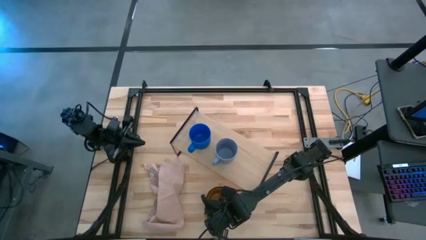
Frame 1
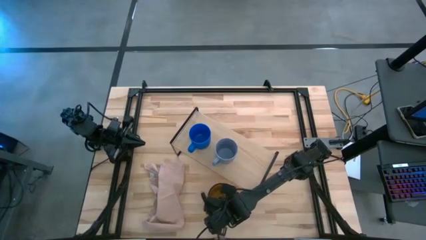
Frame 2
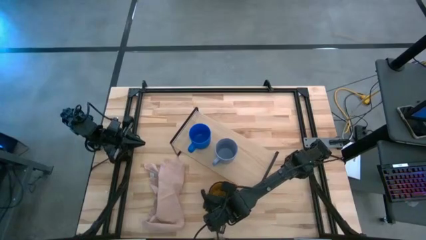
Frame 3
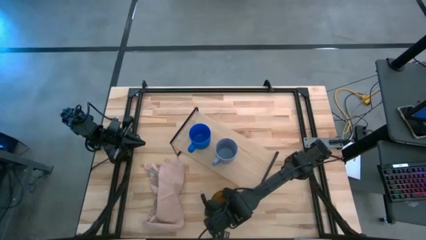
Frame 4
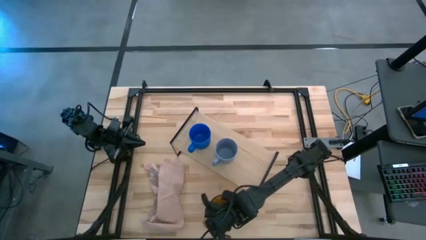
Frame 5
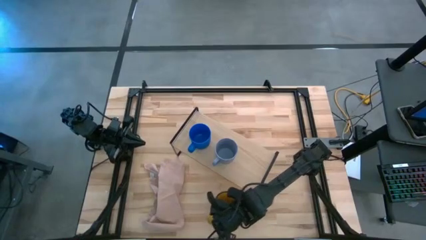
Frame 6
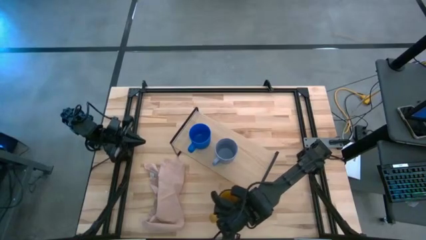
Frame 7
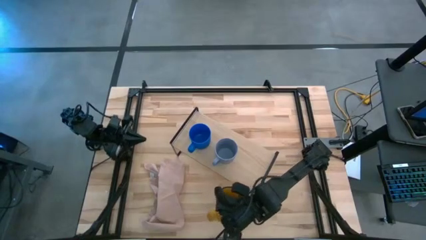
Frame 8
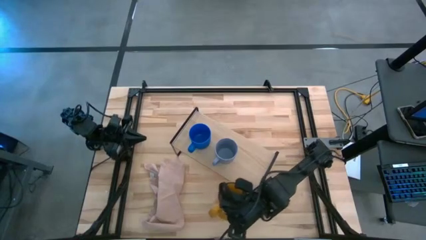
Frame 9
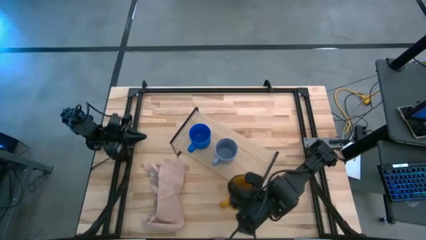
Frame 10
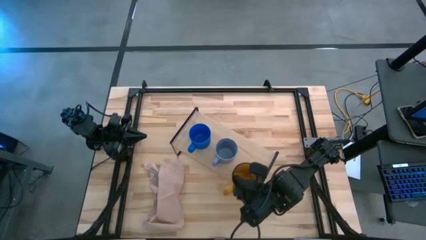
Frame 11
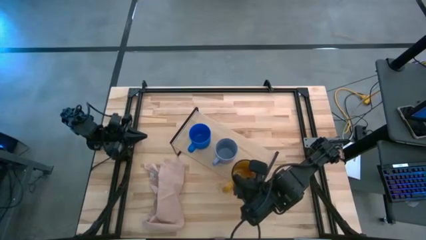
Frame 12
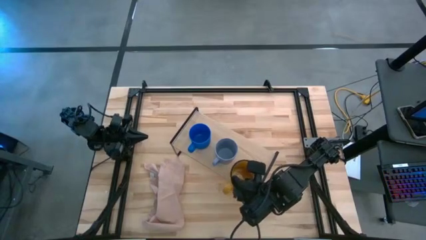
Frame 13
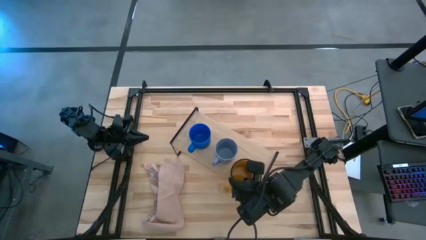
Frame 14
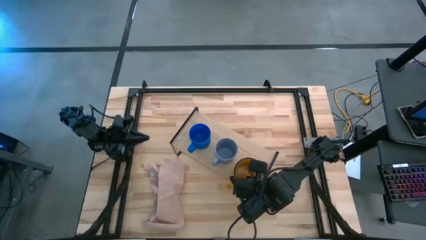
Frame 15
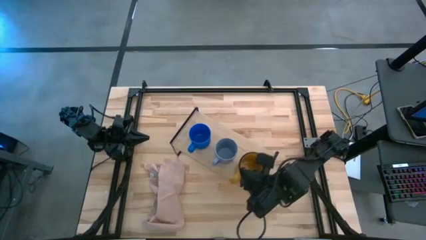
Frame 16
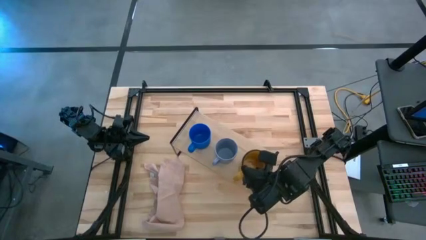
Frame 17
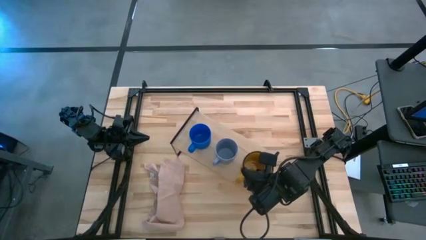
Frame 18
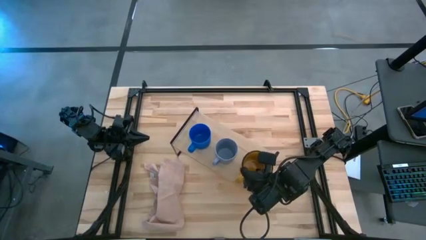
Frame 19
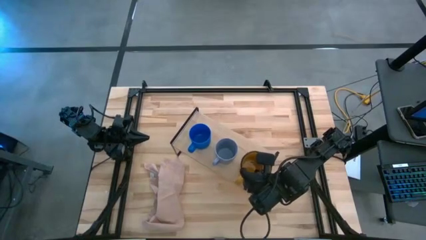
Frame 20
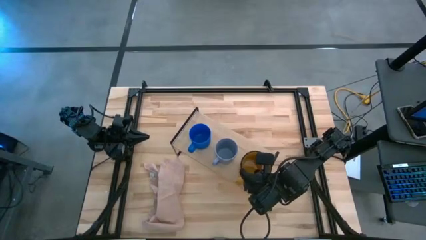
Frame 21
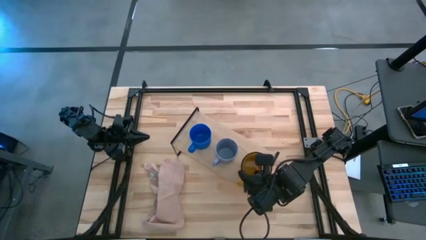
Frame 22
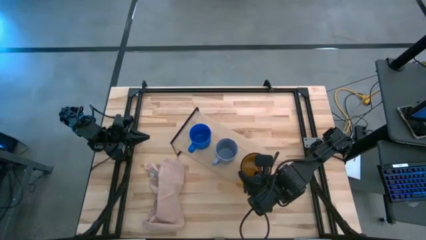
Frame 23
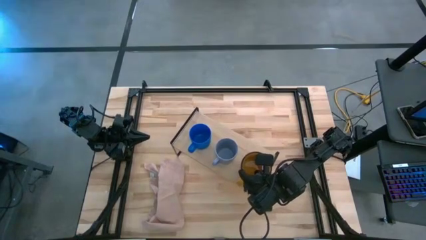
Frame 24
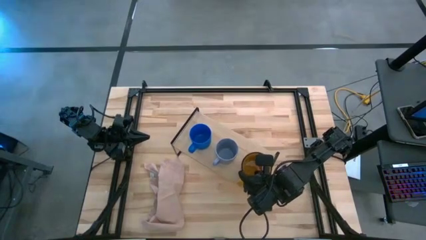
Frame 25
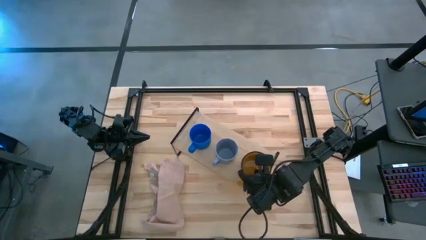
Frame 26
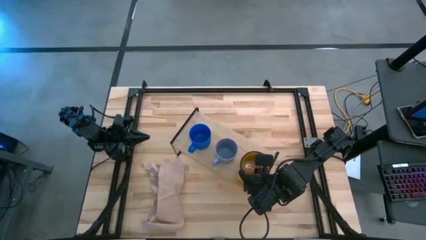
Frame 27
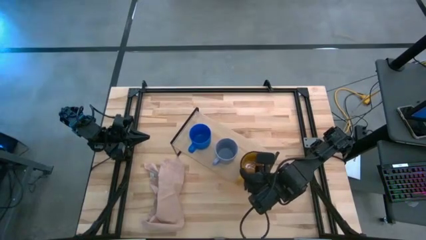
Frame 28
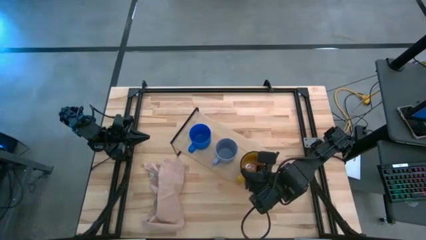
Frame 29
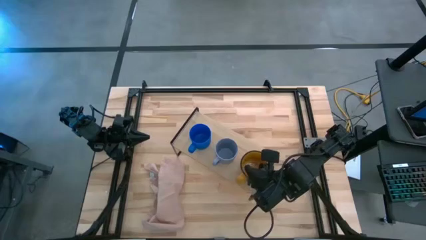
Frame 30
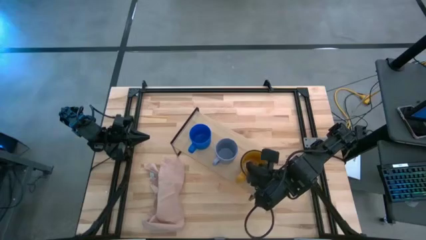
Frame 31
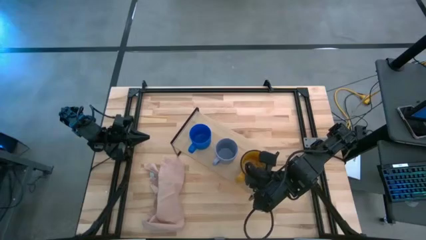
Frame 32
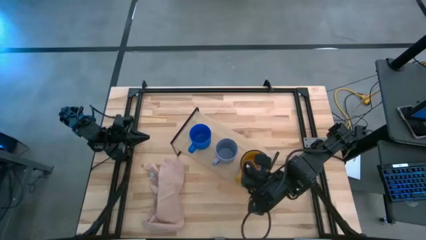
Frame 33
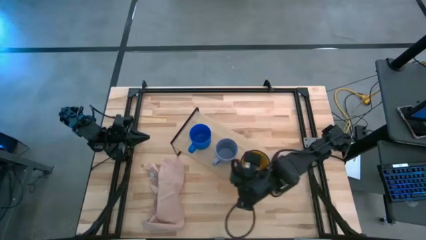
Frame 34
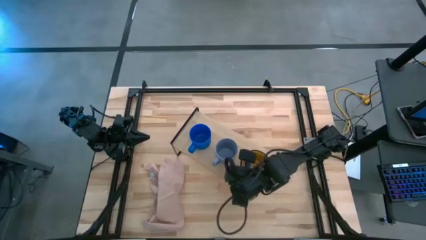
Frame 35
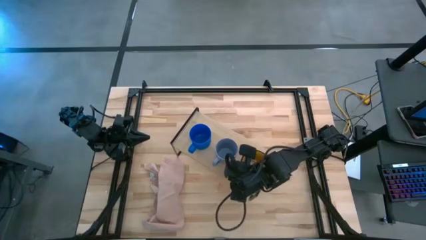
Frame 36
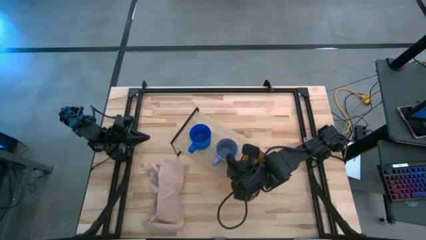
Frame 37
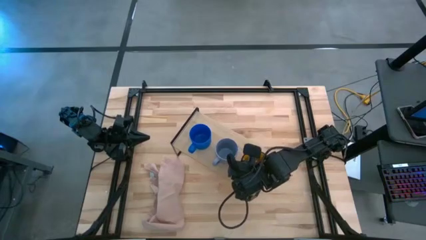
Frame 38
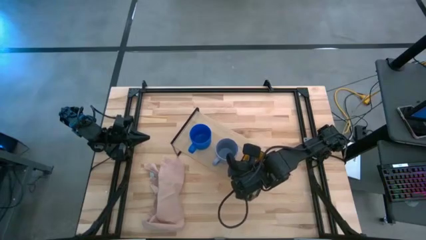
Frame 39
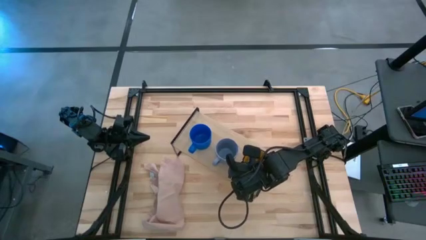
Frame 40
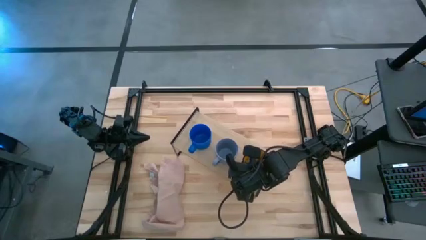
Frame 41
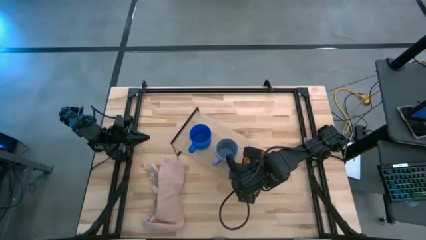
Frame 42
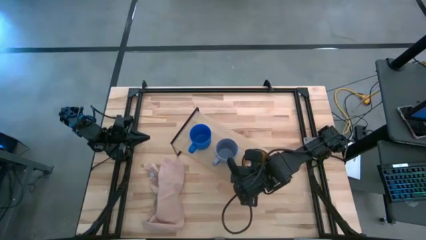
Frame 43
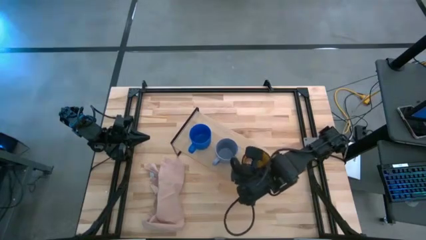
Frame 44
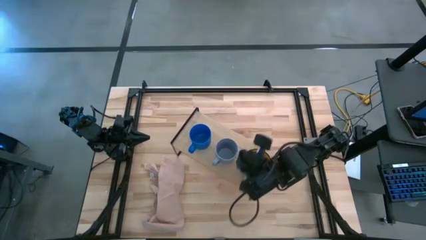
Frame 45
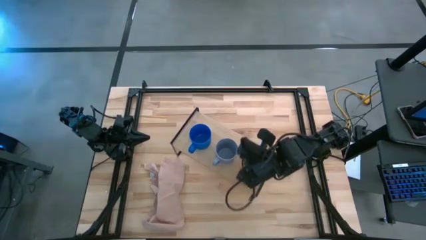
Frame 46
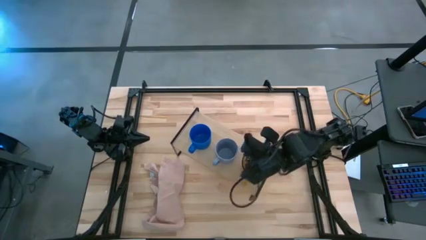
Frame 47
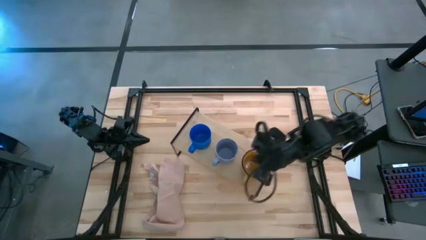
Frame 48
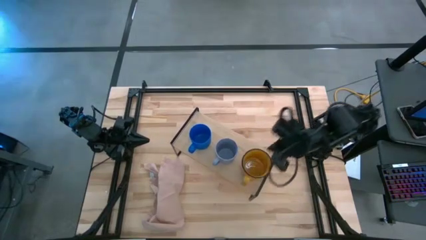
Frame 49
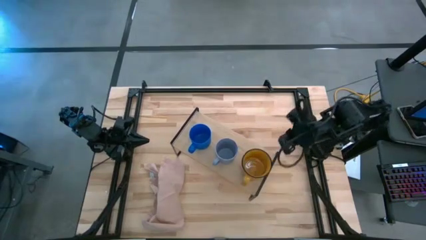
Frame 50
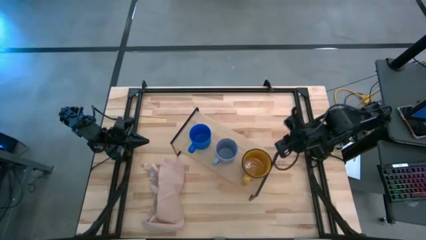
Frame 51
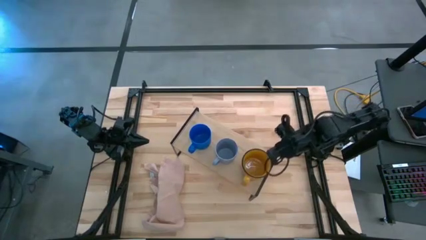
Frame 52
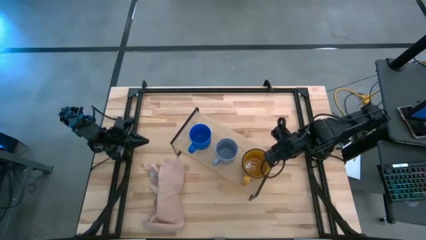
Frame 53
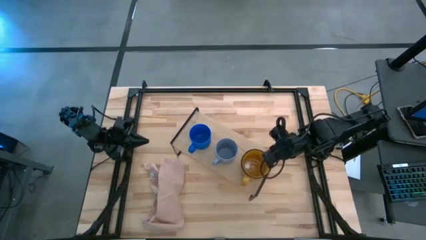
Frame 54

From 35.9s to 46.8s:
Task: Stack small to large cups/mugs on shelf
Put the yellow mug on the shelf

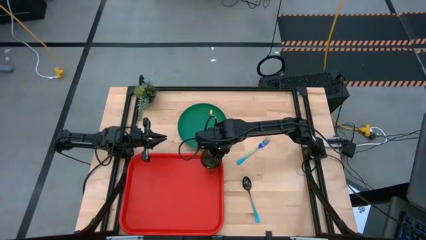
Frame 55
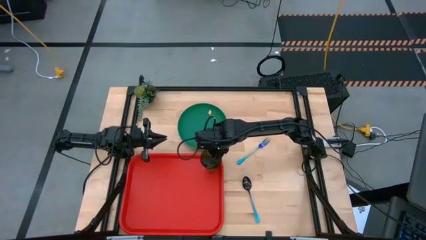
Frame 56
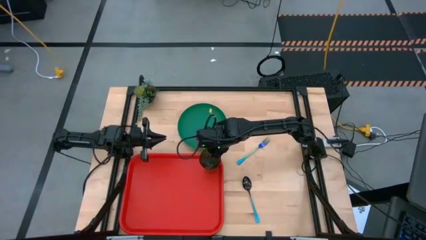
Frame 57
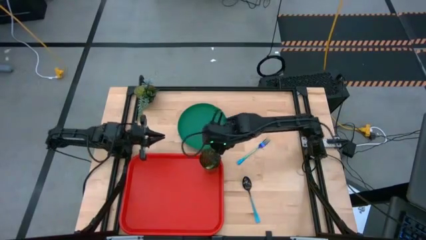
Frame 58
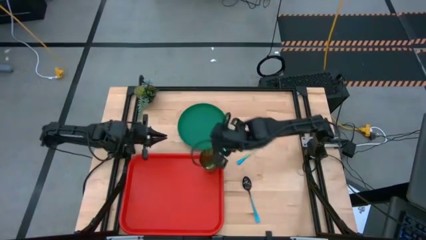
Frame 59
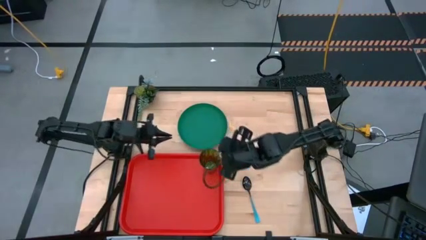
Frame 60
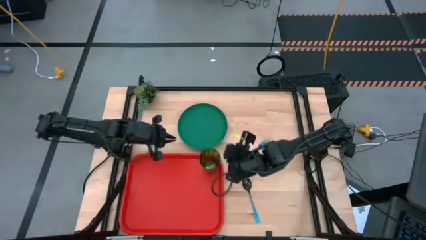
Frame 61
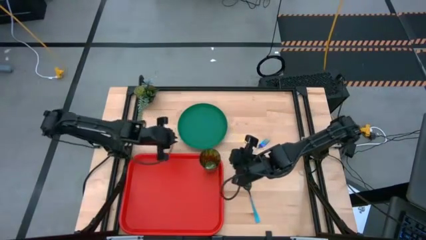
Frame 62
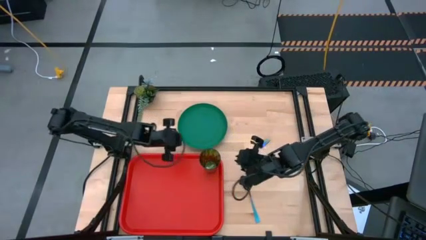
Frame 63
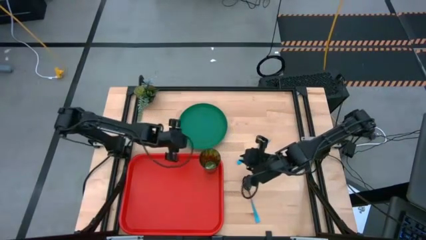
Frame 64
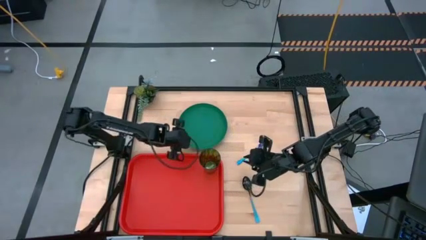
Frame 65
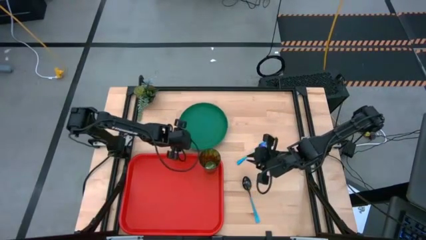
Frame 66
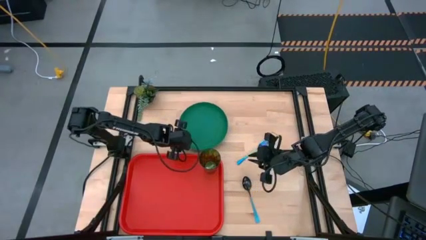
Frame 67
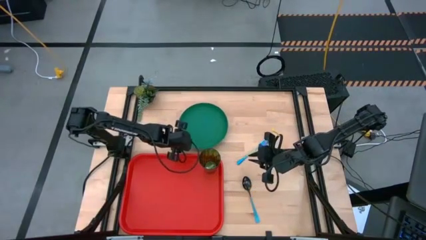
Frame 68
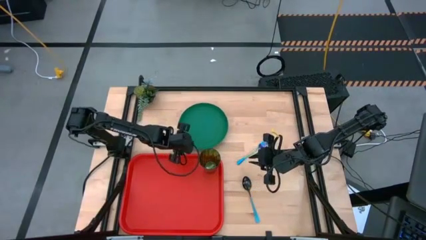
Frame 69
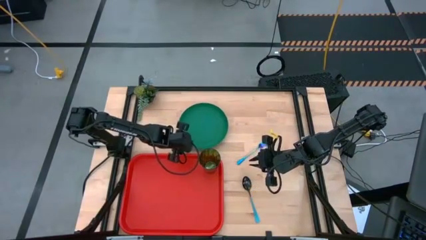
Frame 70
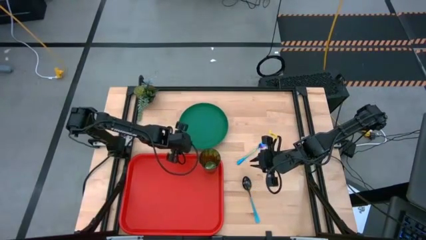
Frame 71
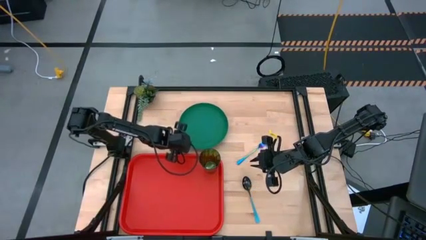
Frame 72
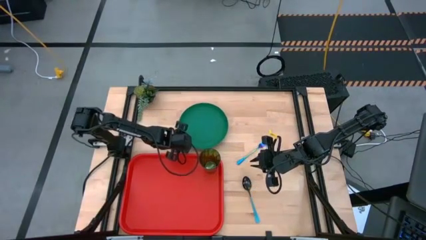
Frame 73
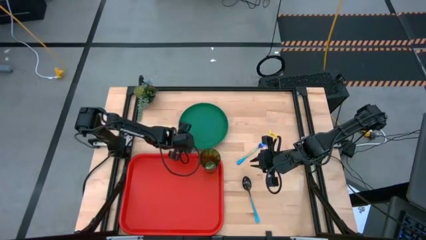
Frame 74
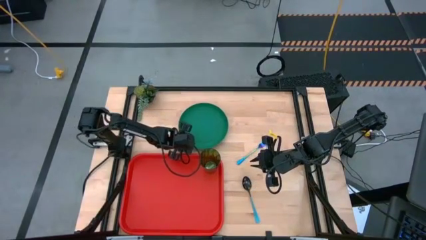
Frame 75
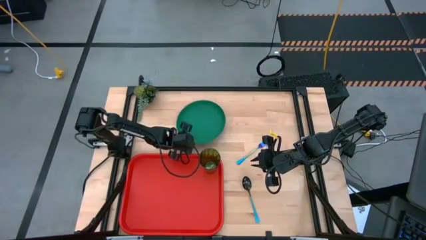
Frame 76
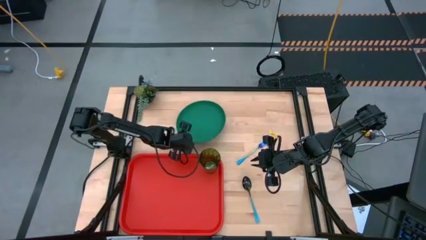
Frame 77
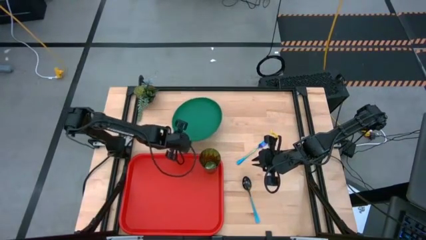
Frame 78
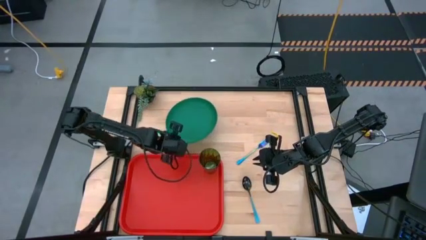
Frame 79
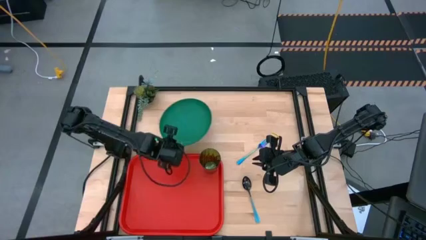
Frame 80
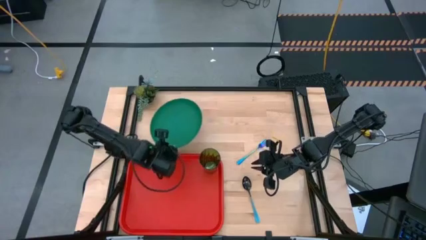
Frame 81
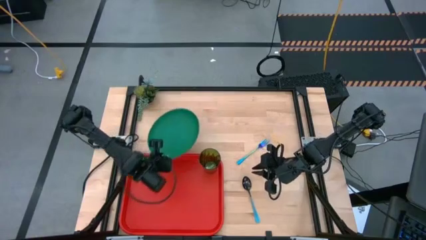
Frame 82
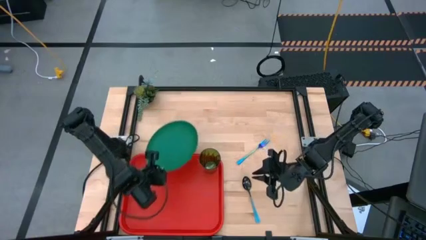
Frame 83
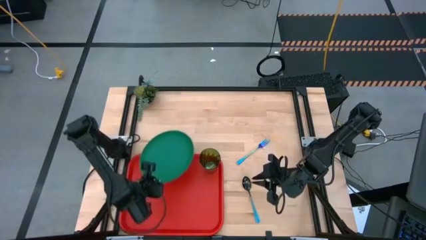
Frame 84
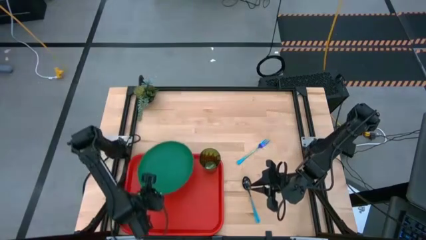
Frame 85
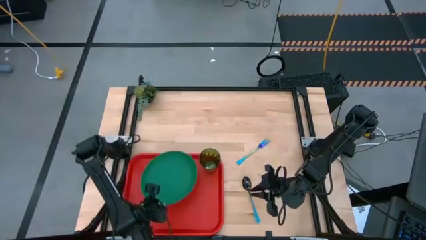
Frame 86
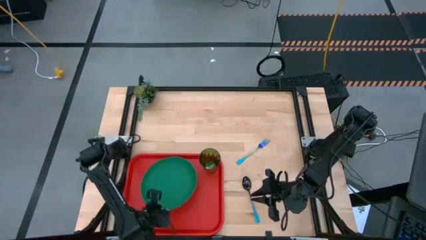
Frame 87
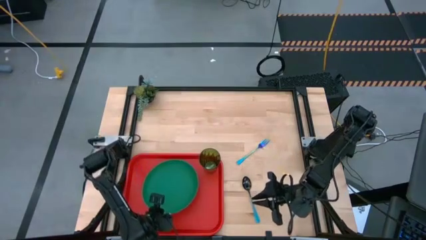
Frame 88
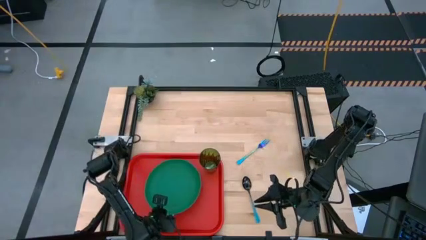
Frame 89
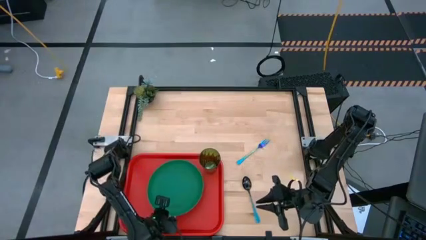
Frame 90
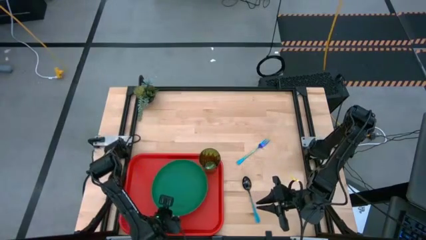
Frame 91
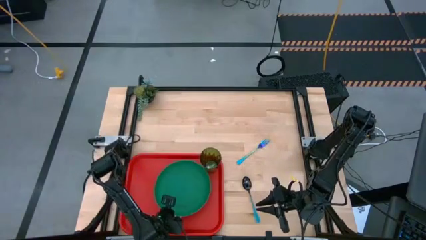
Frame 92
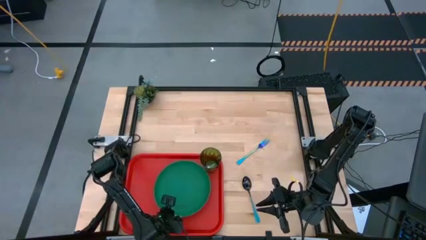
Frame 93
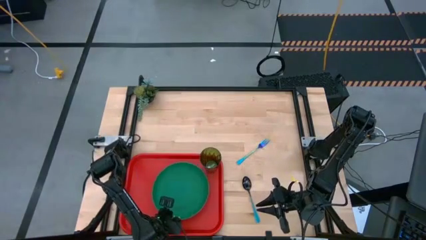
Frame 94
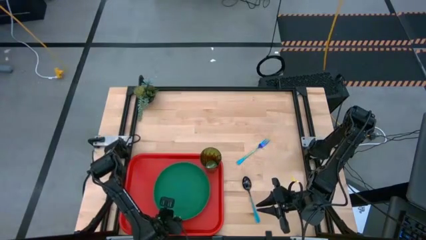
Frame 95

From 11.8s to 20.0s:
Task: Pick and place plate/cup/fork/spoon on tray
Put the green plate on the red tray
